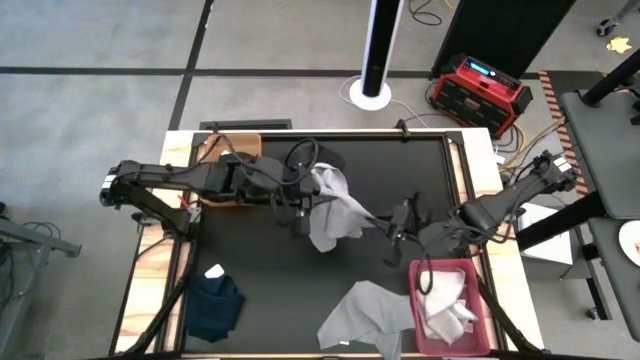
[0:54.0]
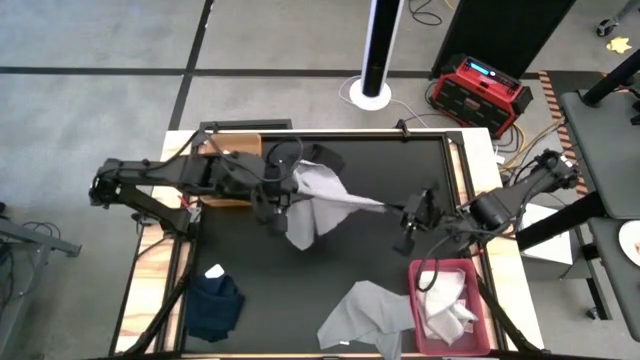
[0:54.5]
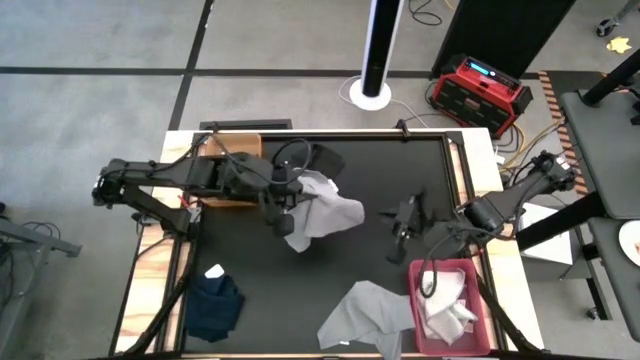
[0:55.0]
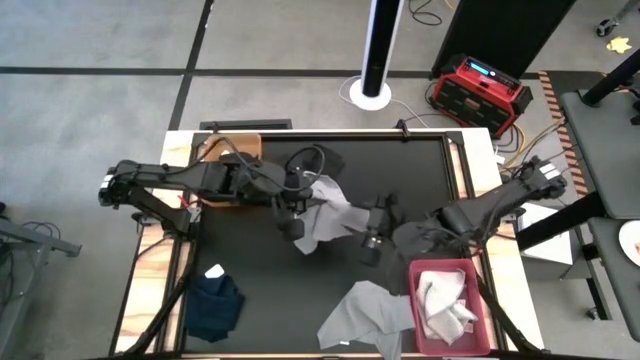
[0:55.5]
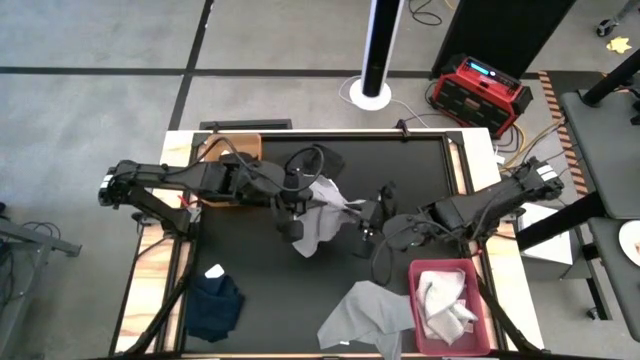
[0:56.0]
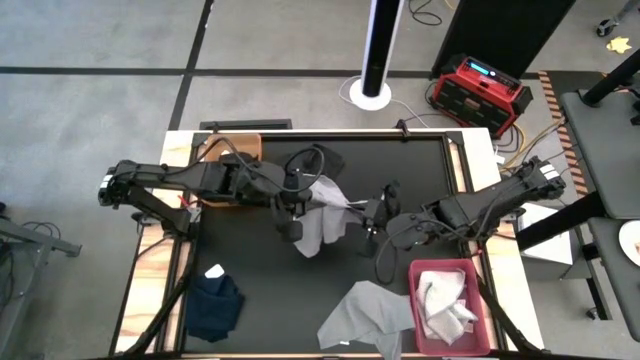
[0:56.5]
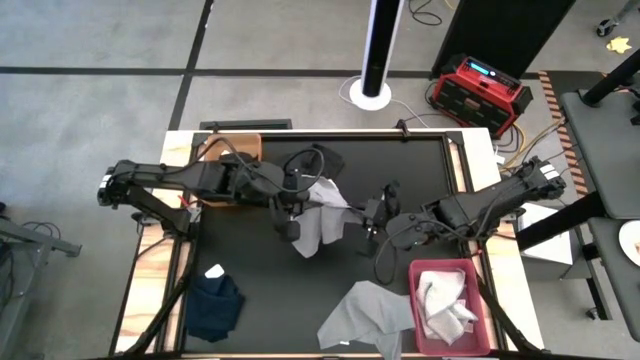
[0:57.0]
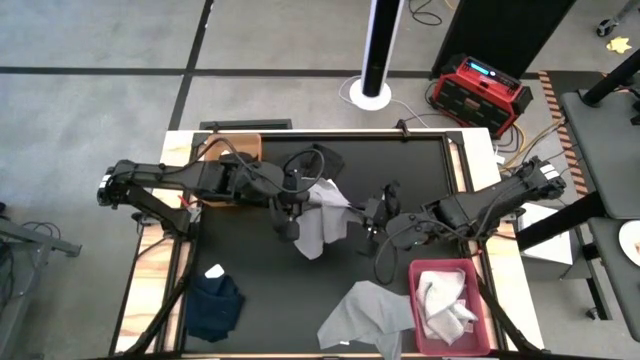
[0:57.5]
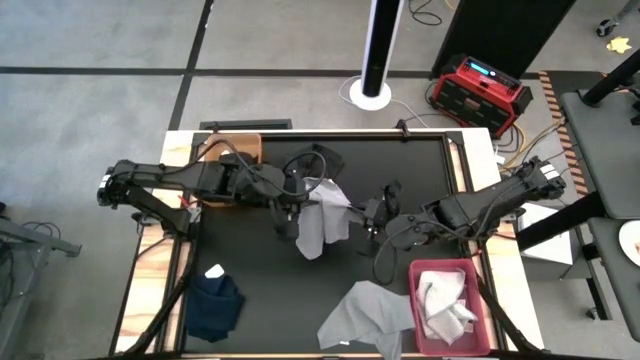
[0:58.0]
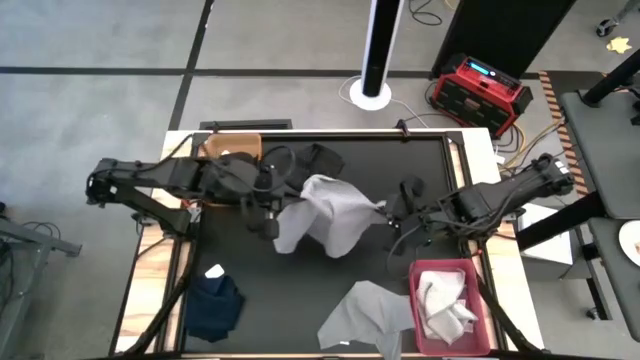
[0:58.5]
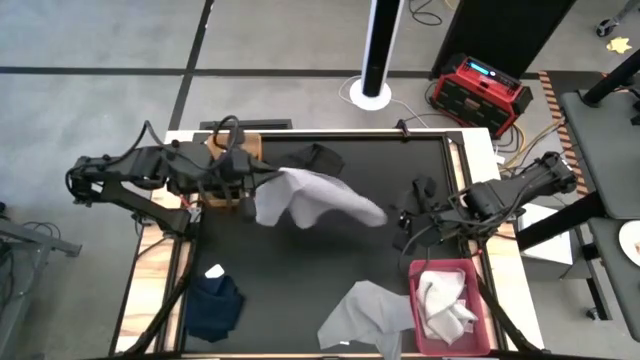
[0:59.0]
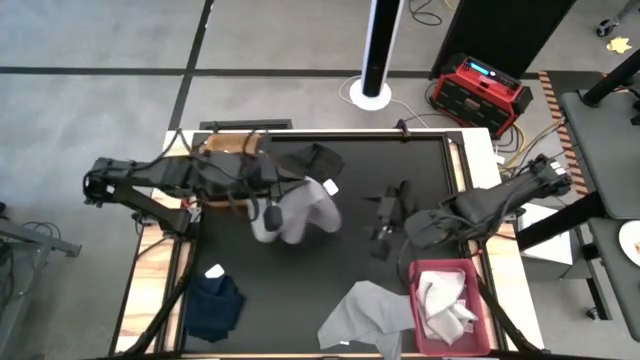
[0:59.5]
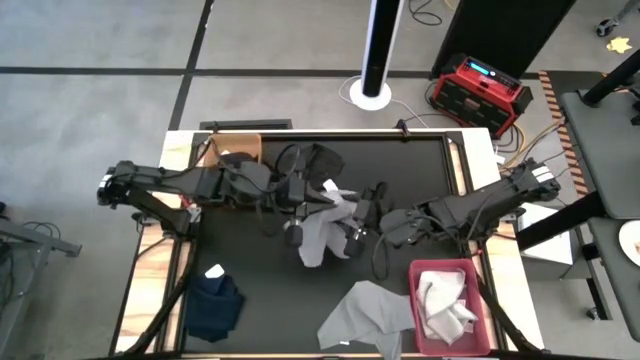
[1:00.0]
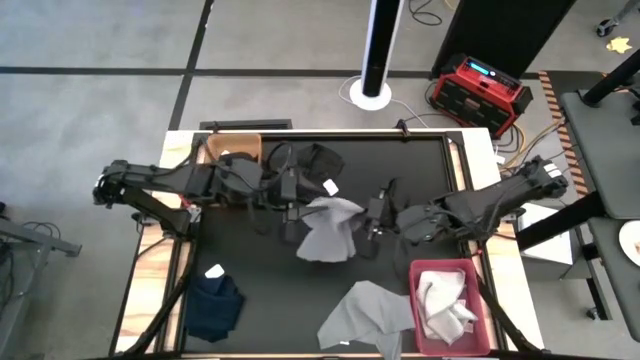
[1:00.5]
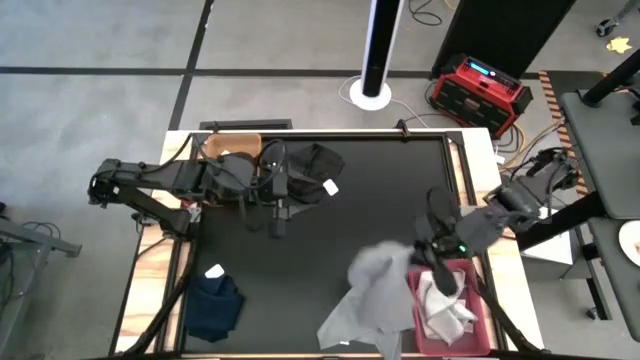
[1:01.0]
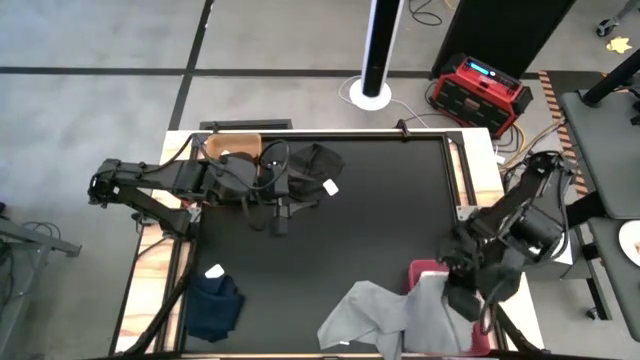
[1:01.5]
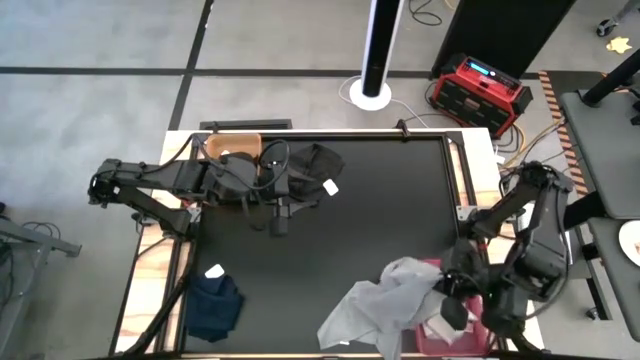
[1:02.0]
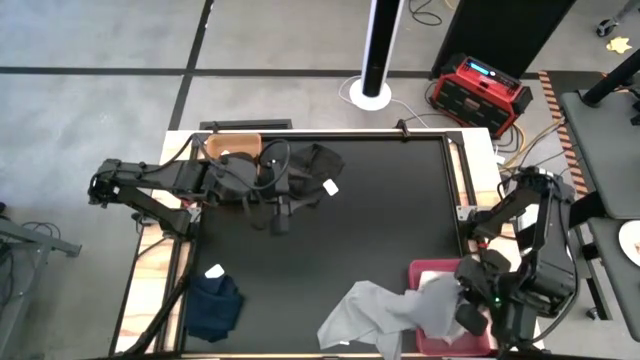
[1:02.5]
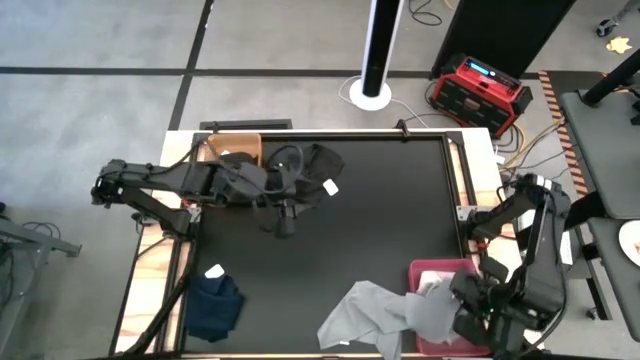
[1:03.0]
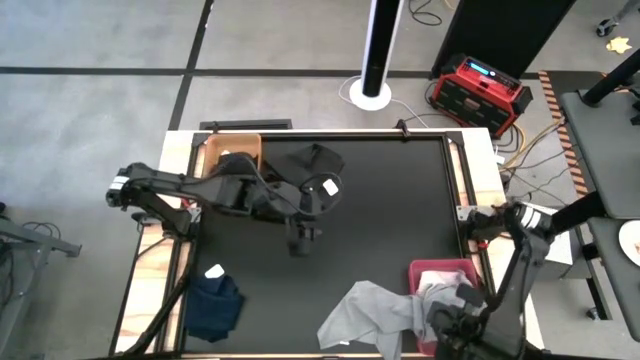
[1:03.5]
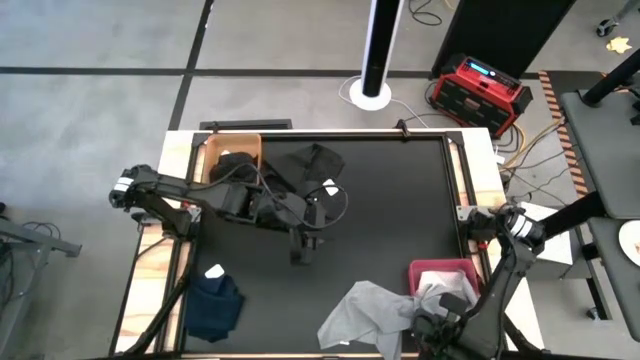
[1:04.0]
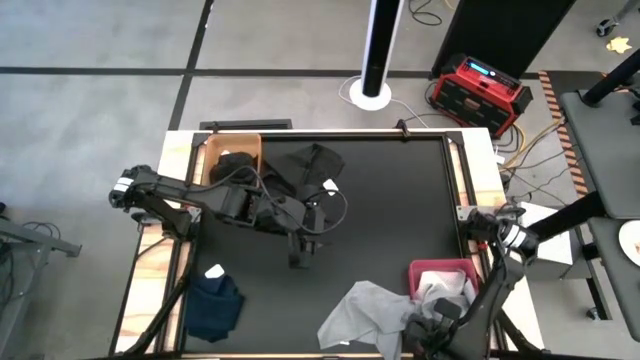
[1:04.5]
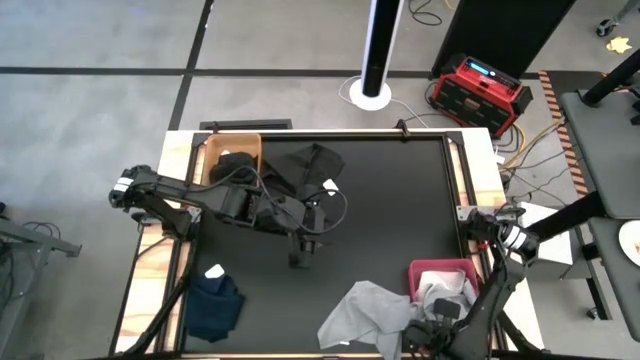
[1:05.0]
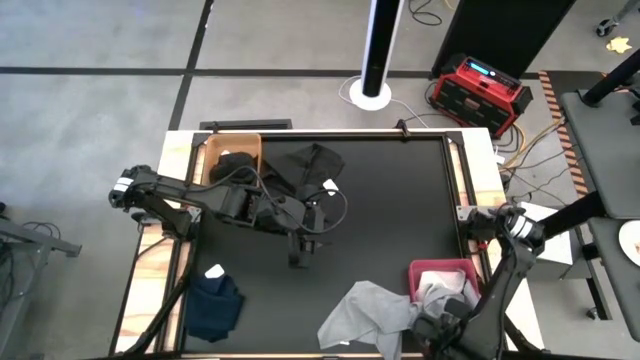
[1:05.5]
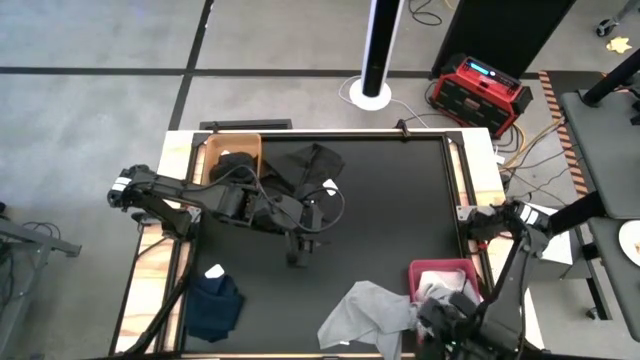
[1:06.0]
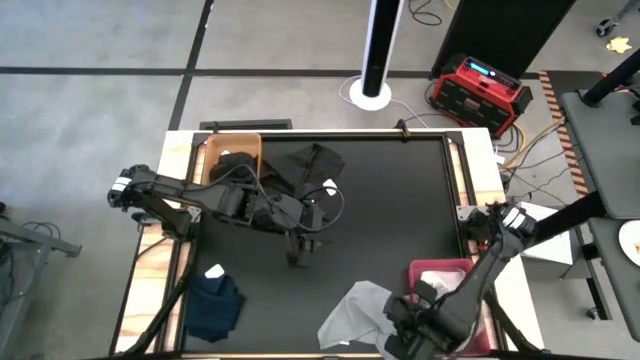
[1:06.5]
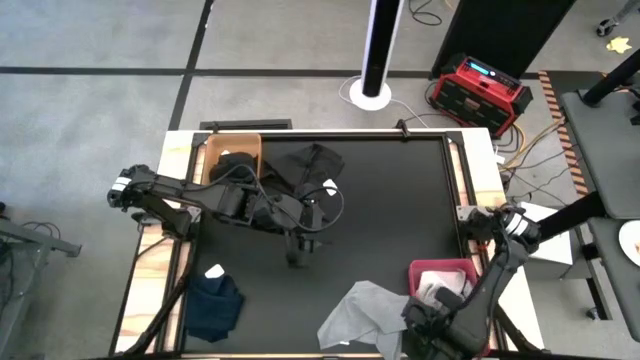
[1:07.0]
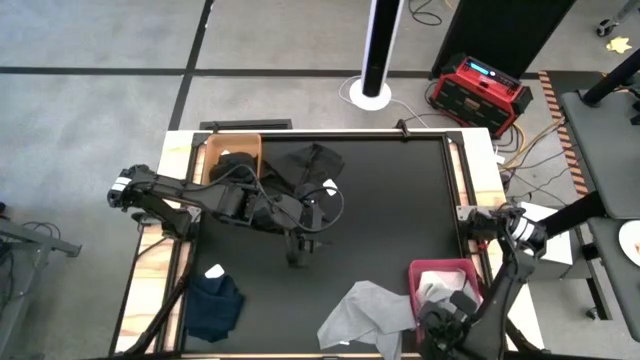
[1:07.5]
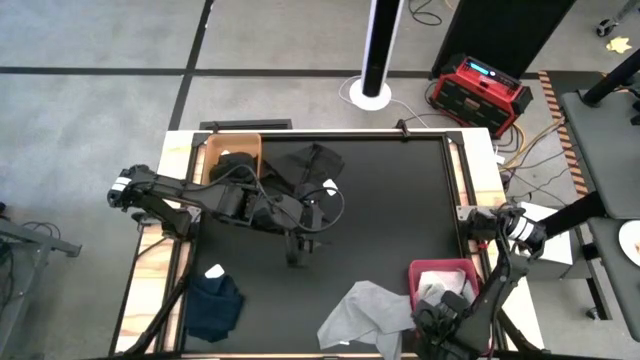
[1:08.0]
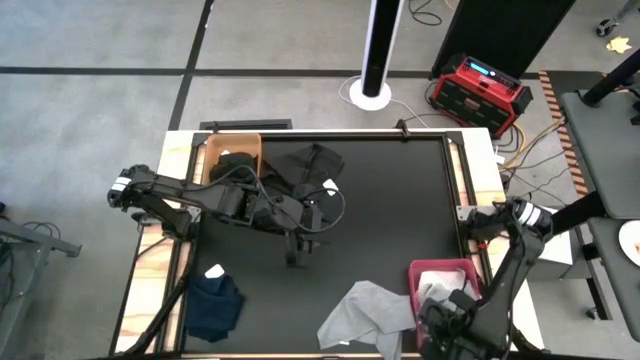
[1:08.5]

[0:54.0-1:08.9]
Task: Sort towels by color in basket
Put the top gray towel into the pink bin

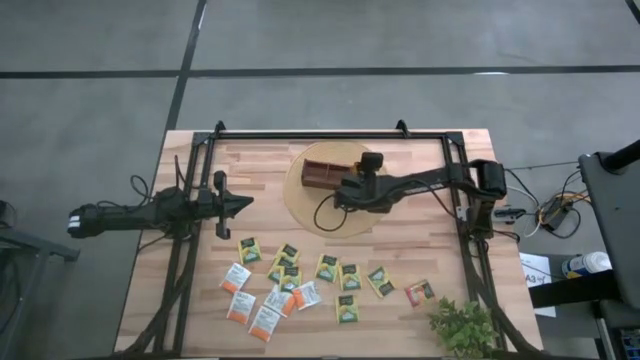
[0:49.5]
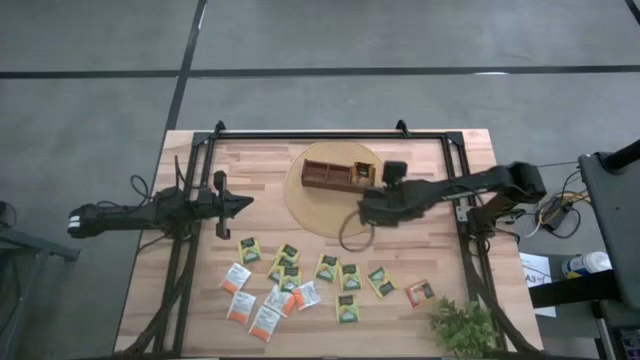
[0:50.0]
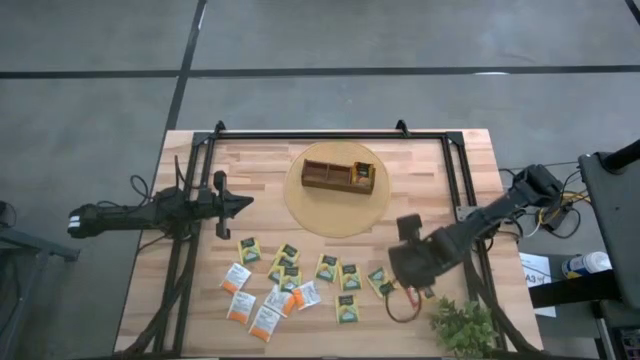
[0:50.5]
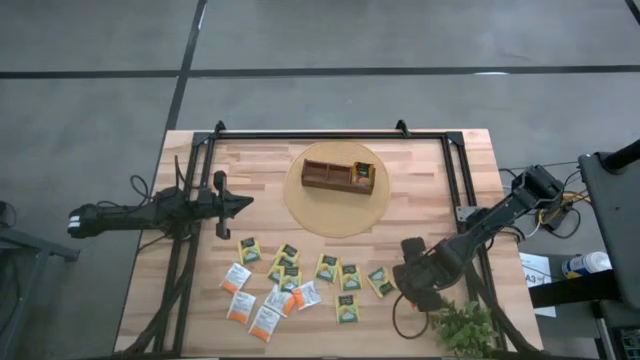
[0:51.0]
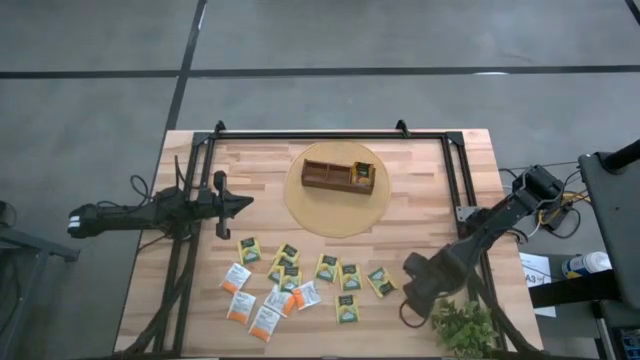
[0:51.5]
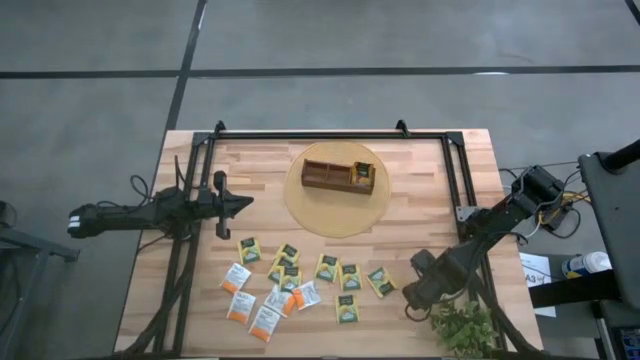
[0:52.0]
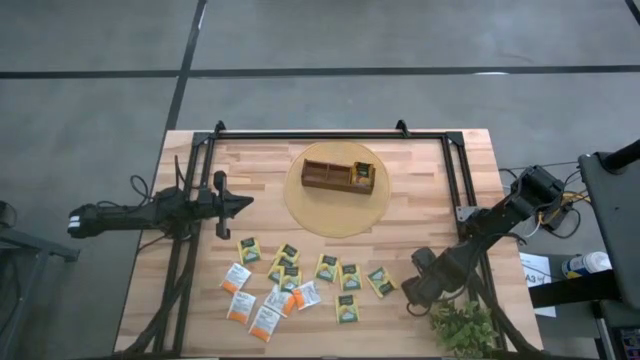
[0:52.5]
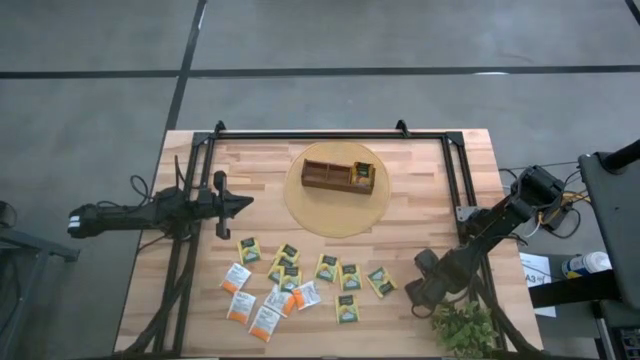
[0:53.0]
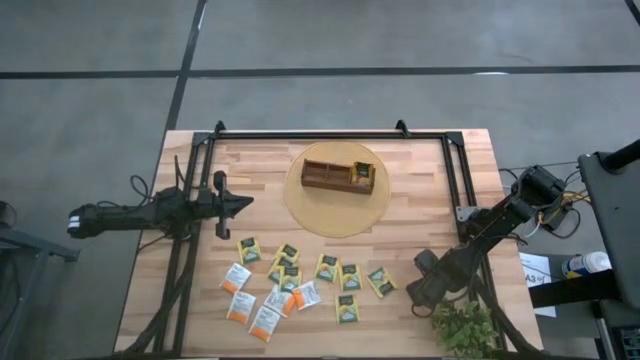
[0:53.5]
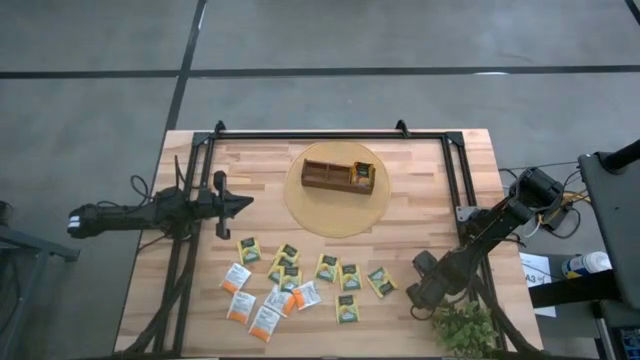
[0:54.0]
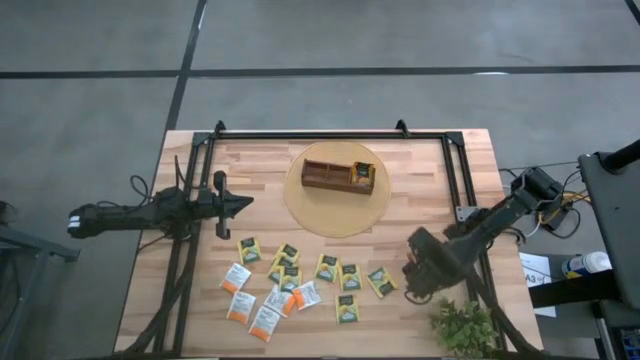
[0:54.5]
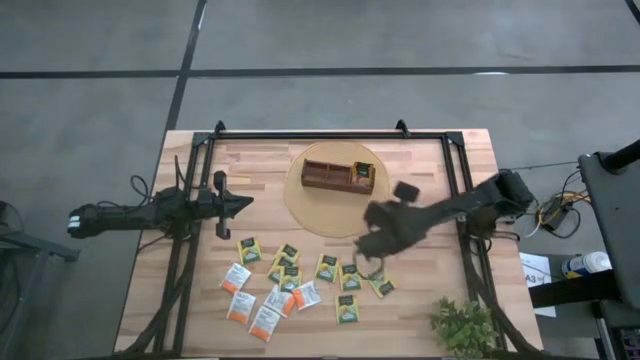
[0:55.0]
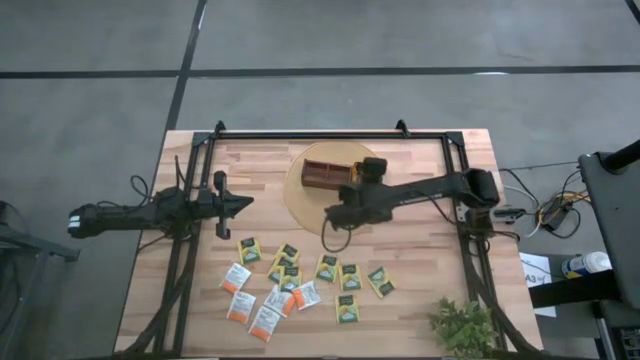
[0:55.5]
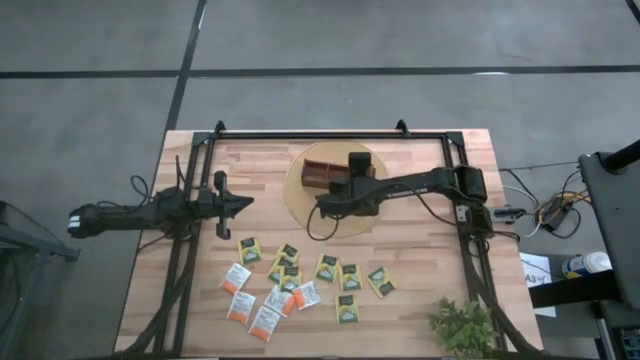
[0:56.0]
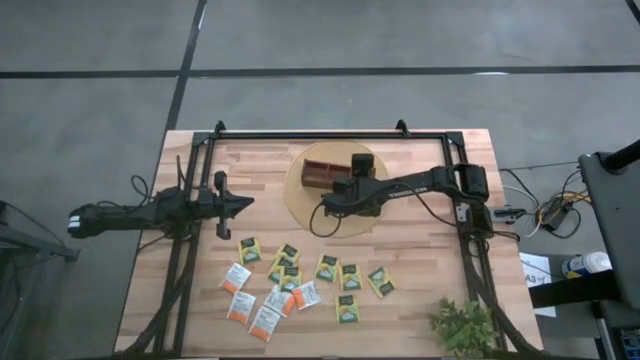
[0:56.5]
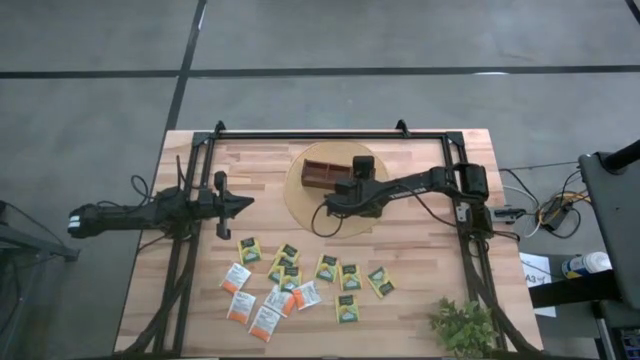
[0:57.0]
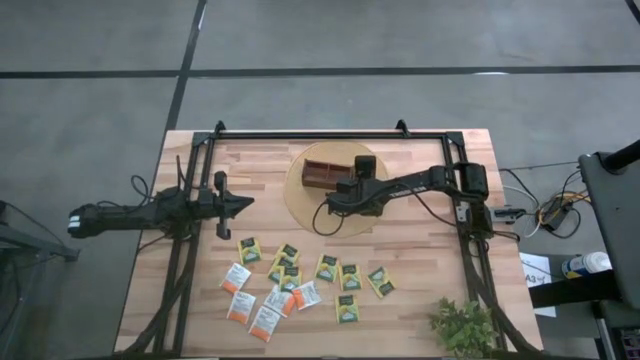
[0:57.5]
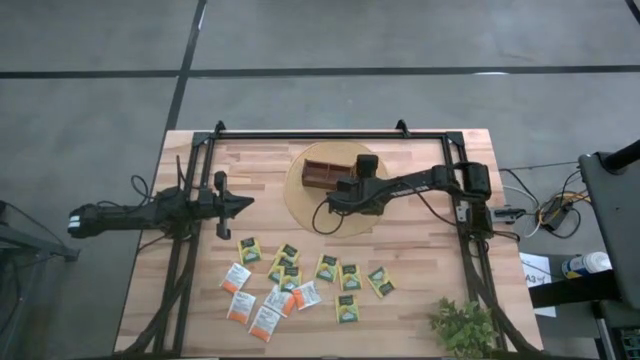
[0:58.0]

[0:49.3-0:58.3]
Task: Pick & Place Tea
Put the orange tea bag into the right section of wooden organizer
